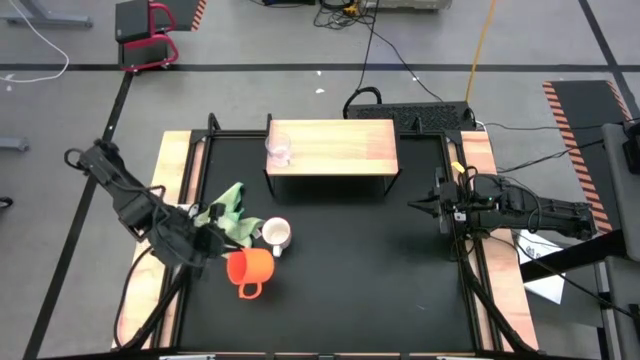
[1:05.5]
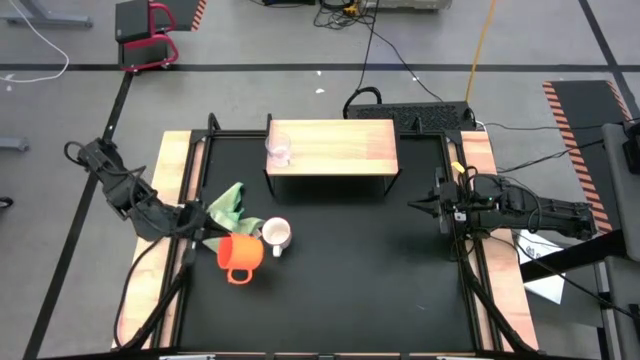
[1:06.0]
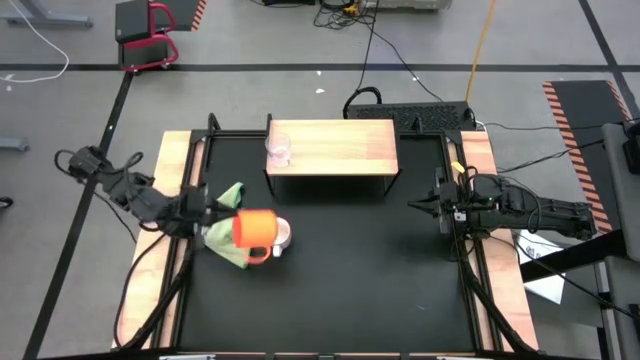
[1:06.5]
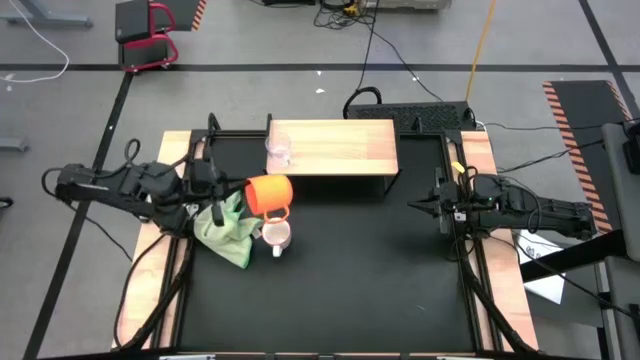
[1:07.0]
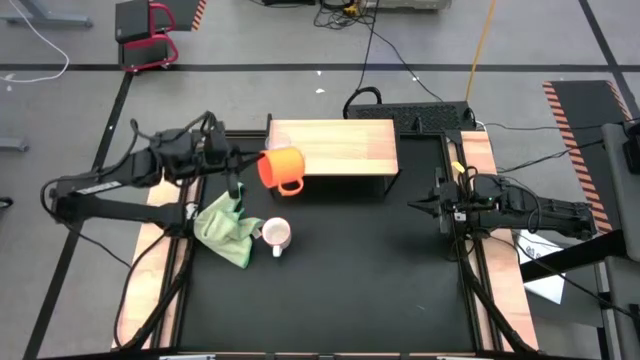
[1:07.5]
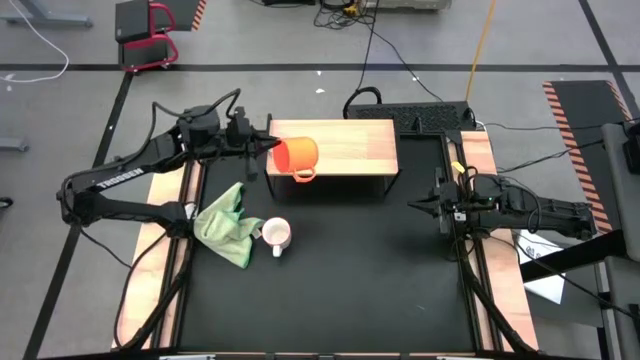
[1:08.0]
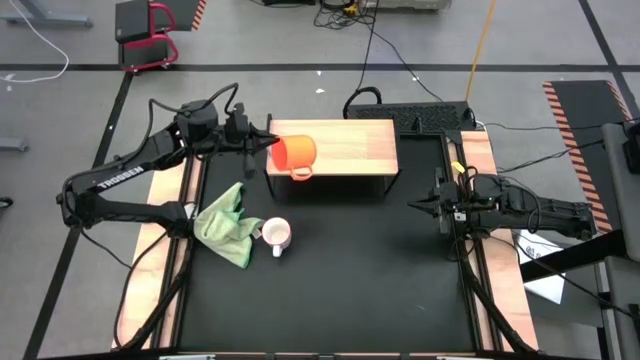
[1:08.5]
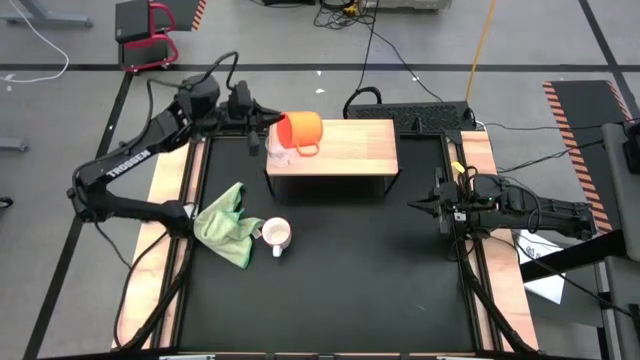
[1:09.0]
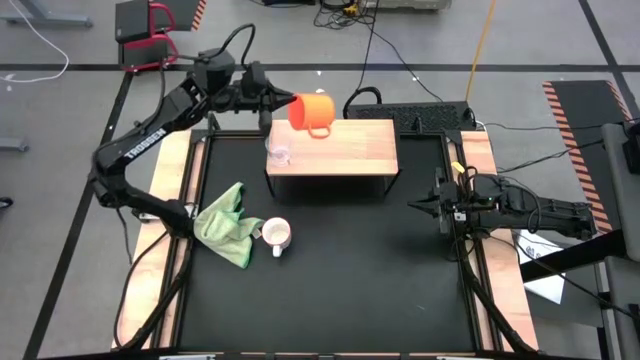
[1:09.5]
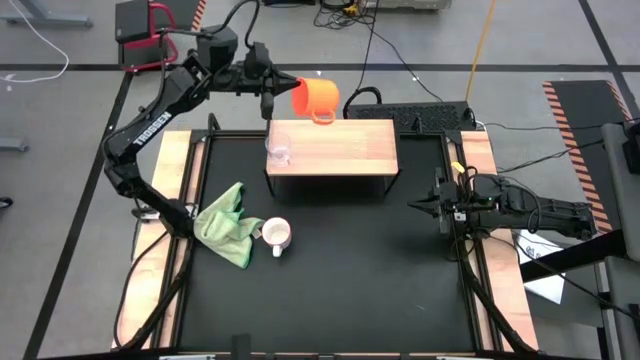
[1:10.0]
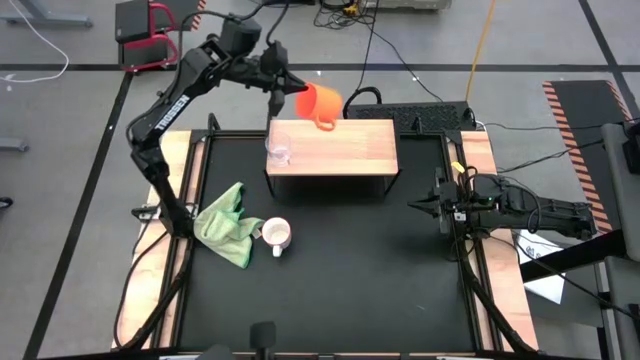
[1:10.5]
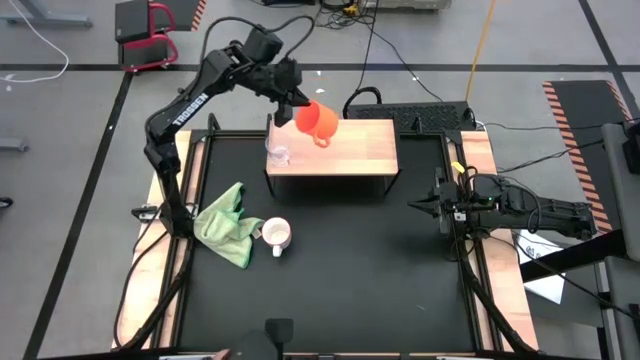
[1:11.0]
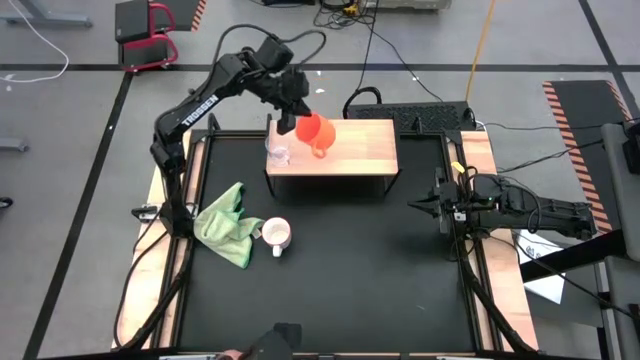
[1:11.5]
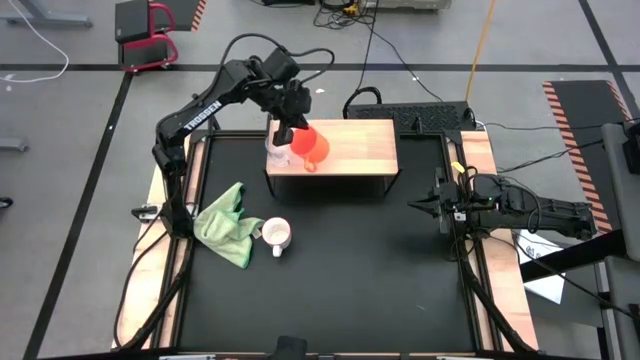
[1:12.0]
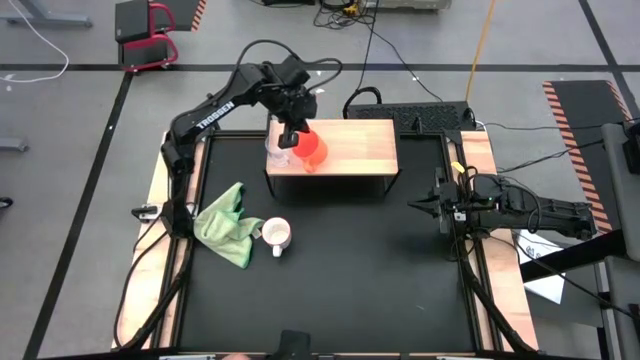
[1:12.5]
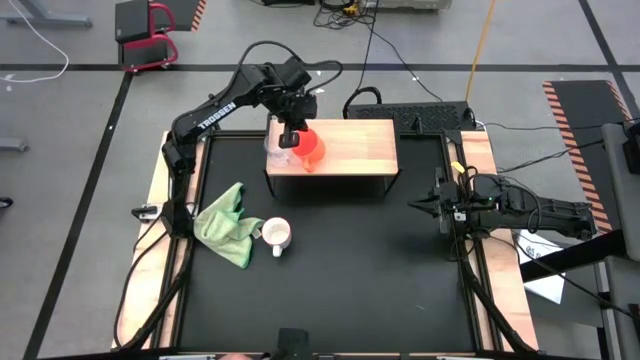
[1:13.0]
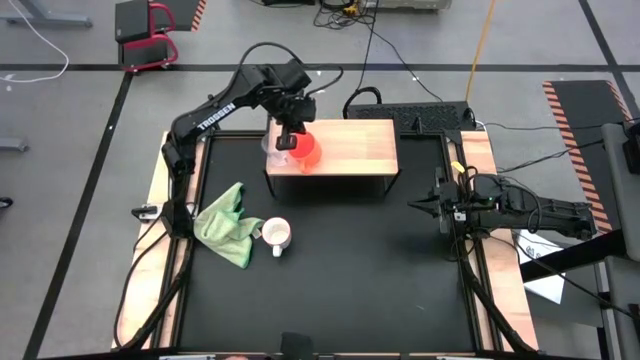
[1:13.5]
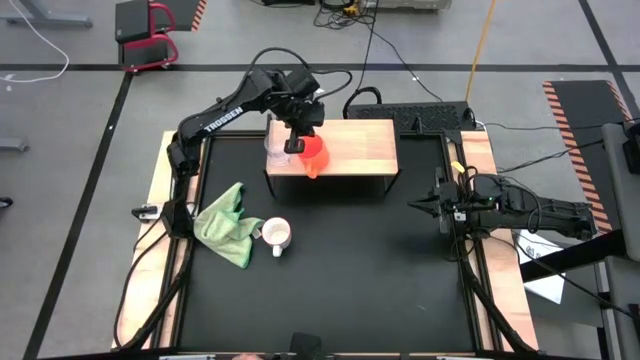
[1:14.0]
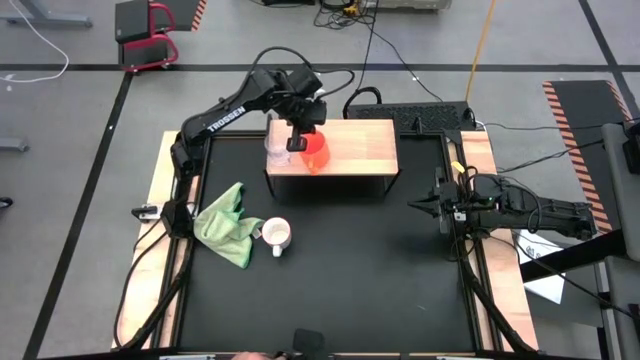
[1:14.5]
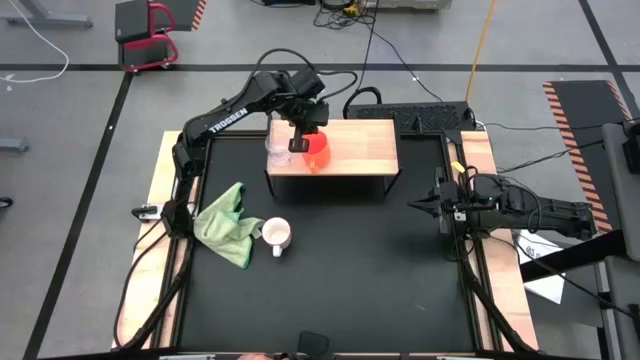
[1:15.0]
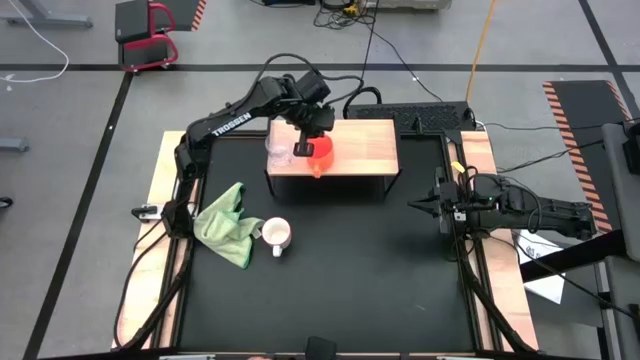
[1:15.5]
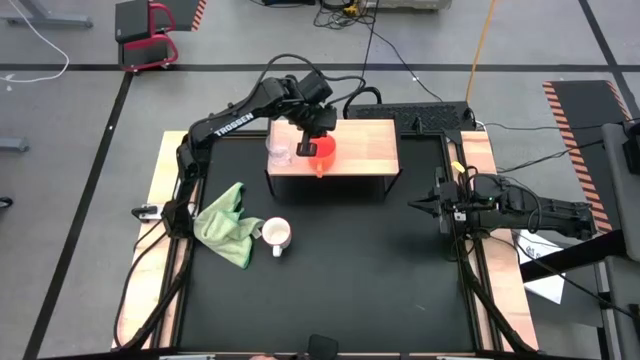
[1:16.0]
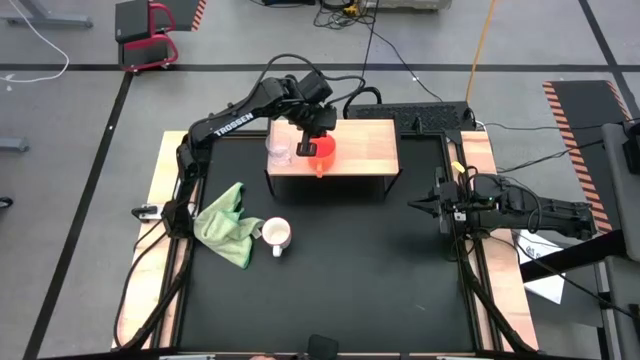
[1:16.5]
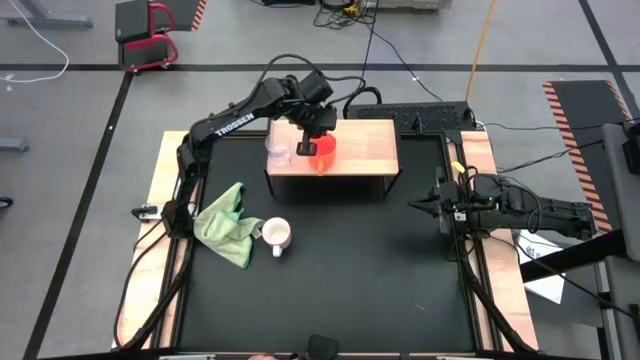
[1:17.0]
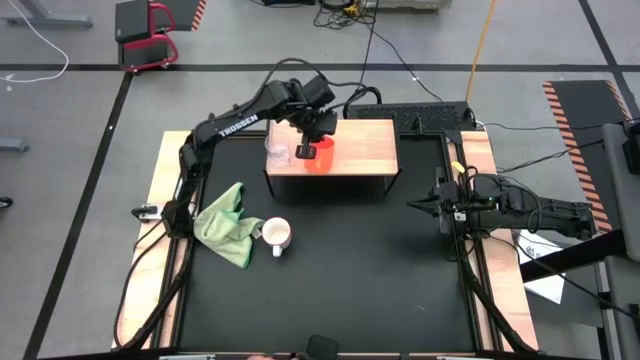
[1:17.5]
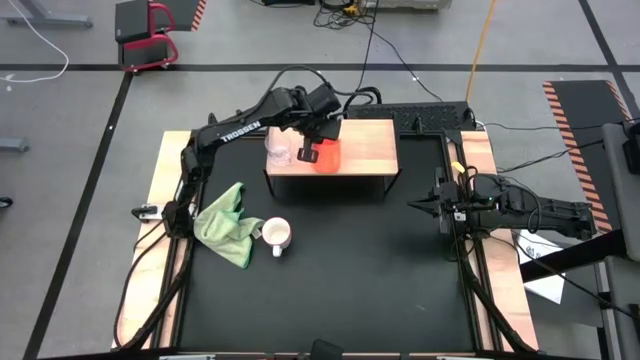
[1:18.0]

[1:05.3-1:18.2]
Task: Stack small to large cups/mugs on shelf
Put the orange mug on the shelf

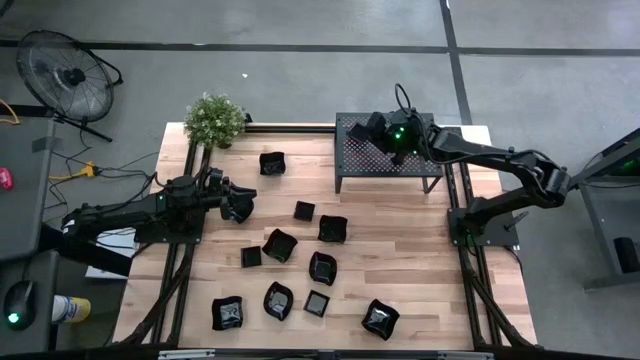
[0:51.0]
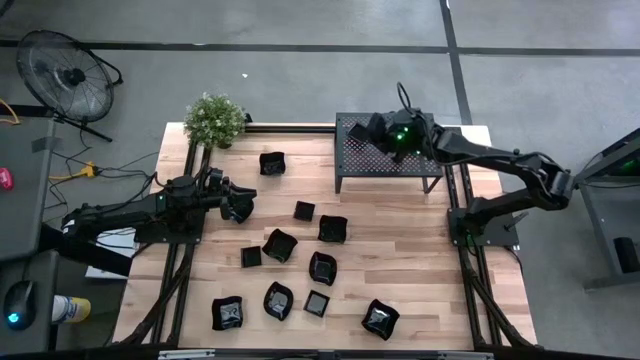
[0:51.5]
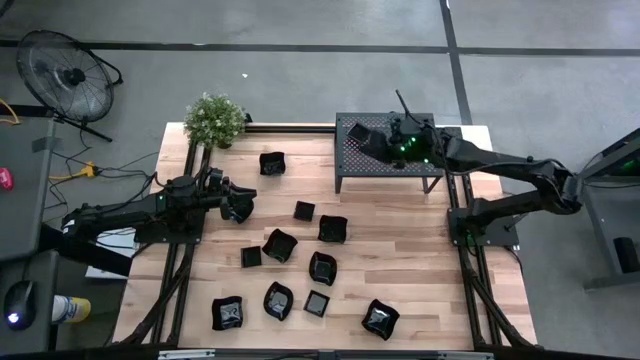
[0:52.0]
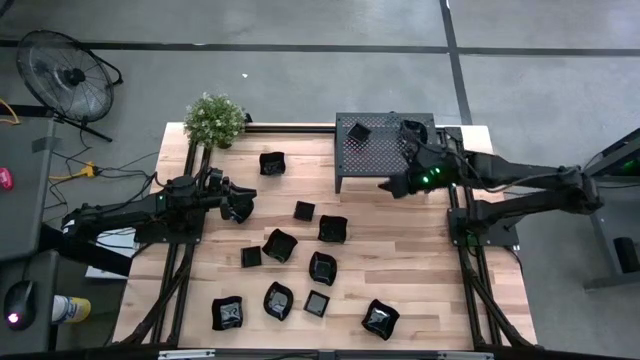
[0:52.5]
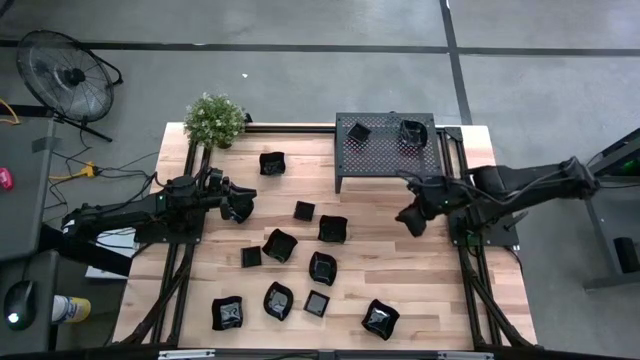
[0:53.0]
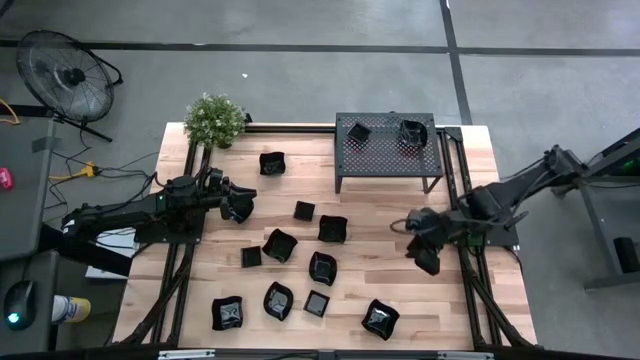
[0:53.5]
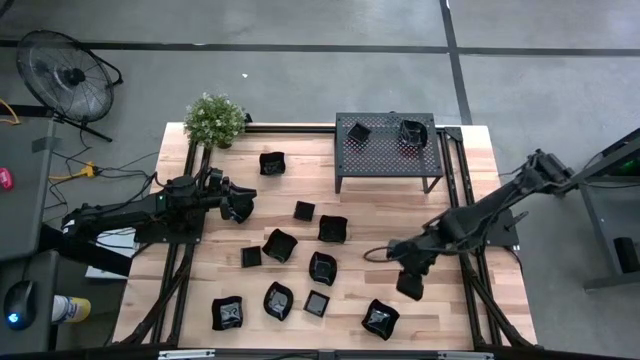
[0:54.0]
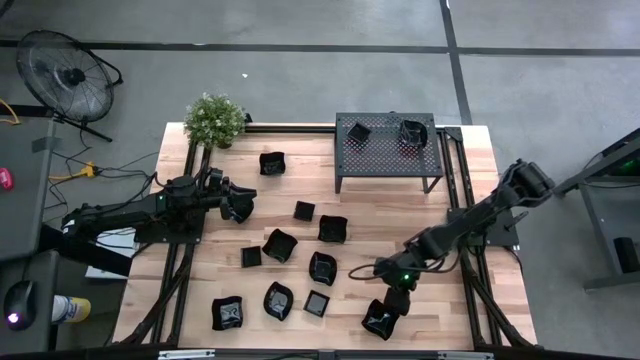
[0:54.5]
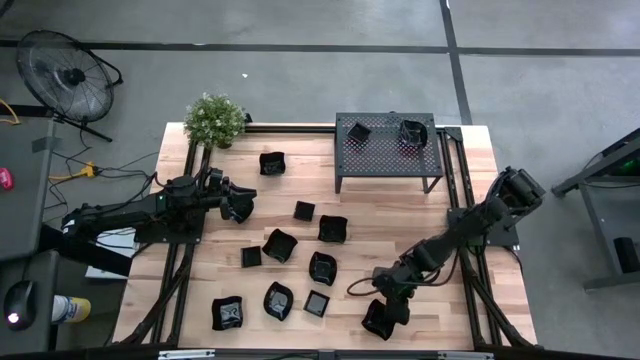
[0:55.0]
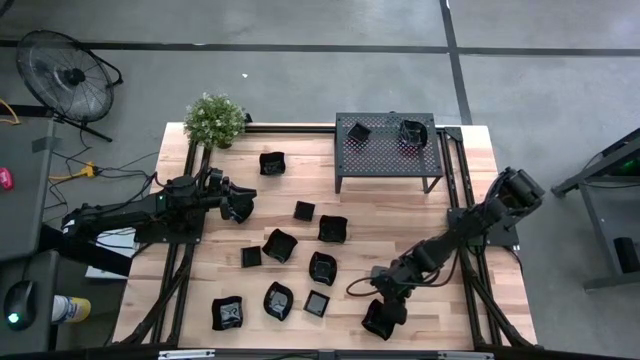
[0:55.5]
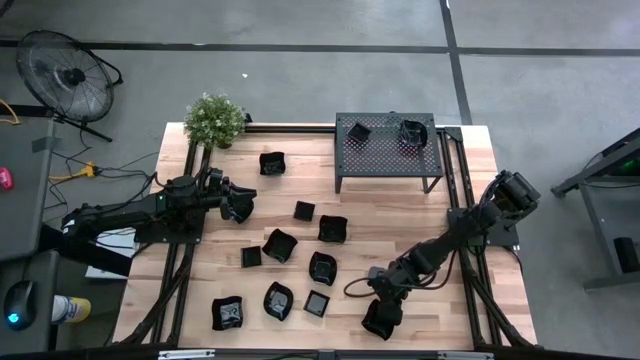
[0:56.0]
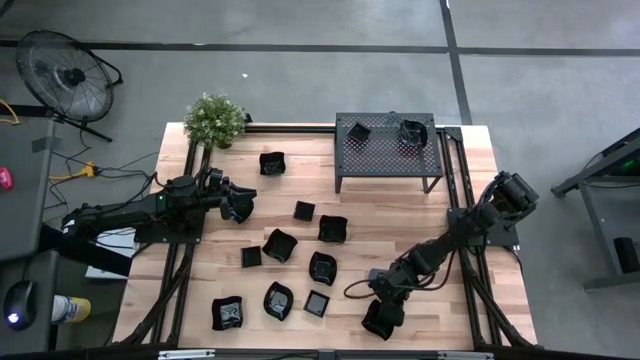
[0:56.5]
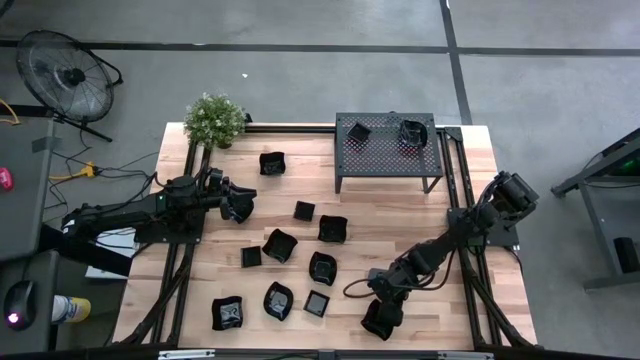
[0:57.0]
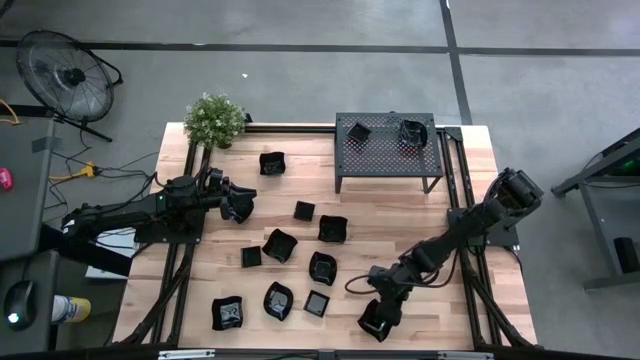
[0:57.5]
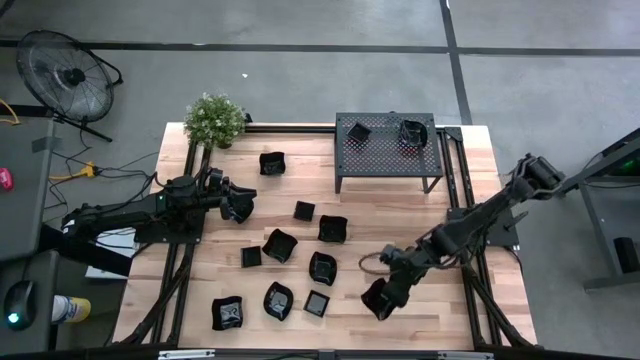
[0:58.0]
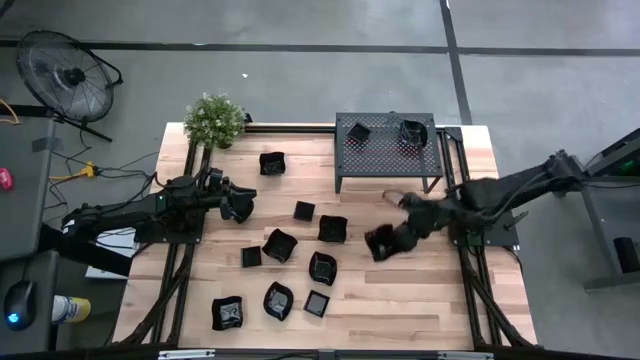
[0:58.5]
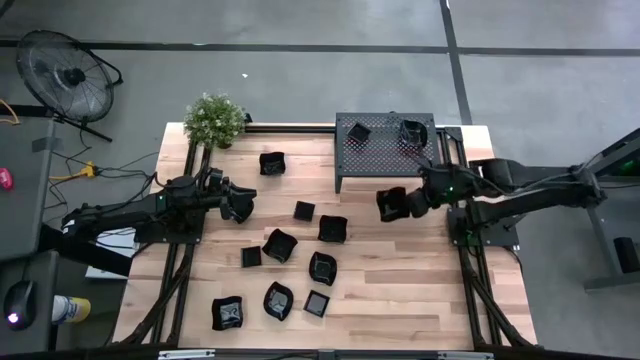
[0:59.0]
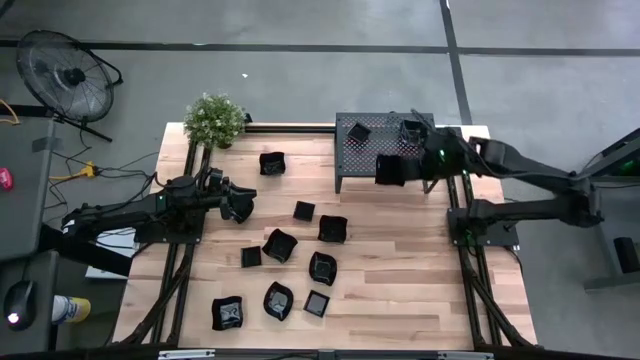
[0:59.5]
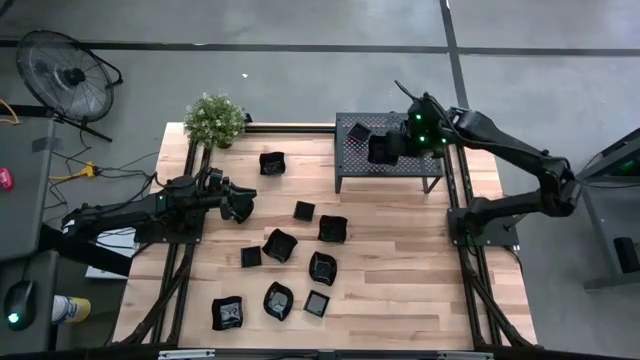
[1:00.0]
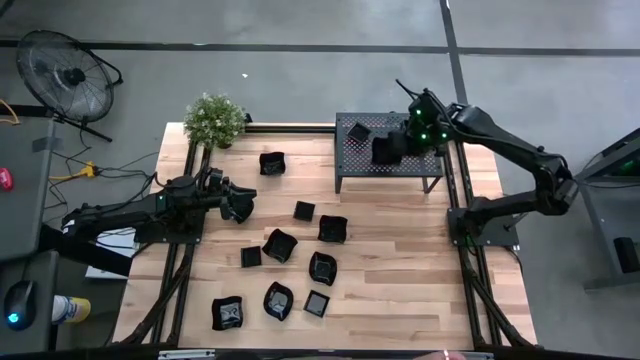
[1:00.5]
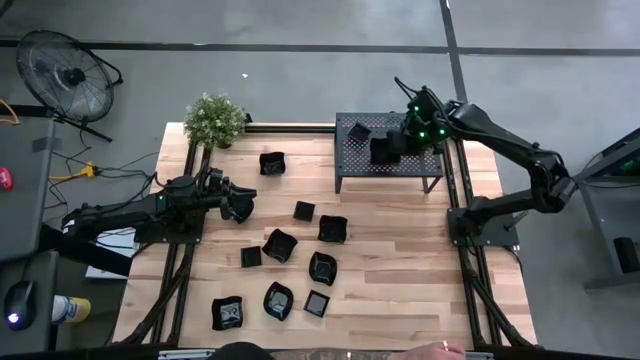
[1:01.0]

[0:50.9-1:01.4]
Task: Pick & Place Mini shaped plates
Put the black distorted square plate on the shelf
